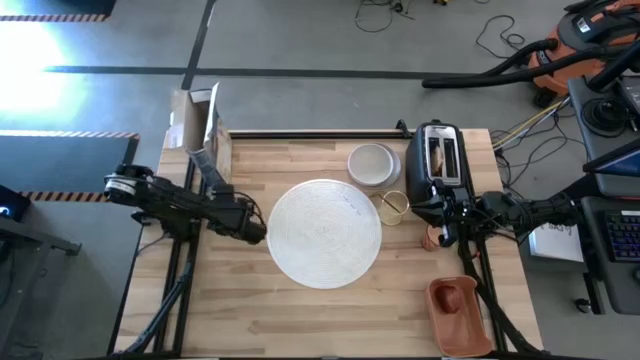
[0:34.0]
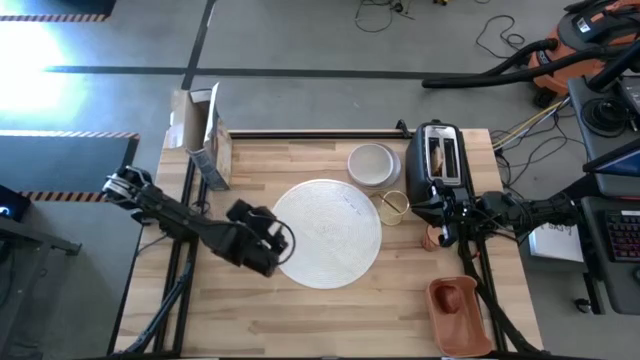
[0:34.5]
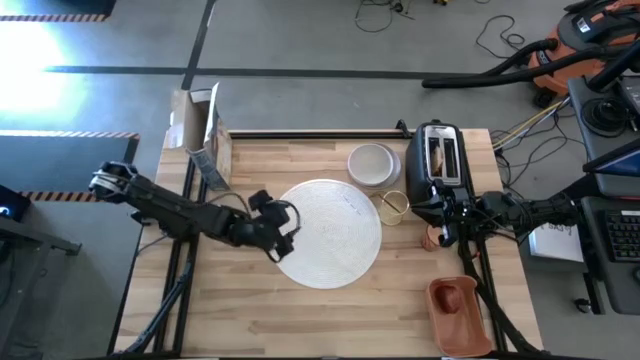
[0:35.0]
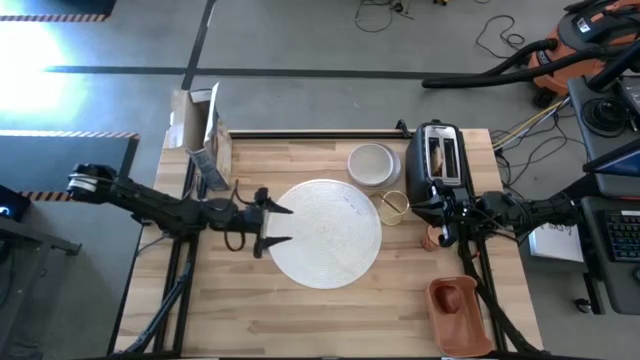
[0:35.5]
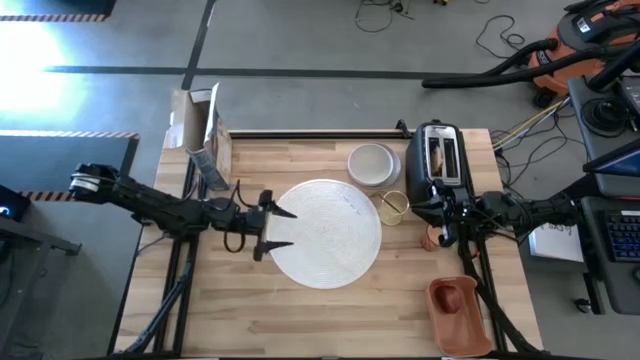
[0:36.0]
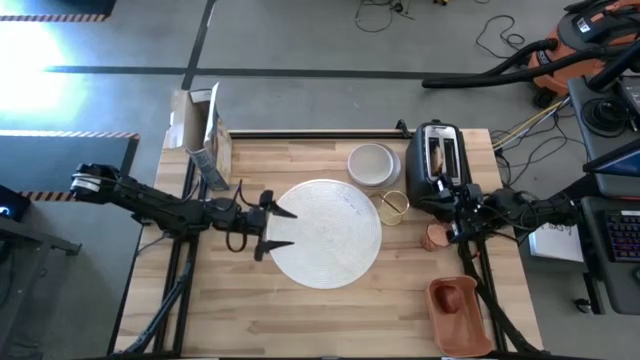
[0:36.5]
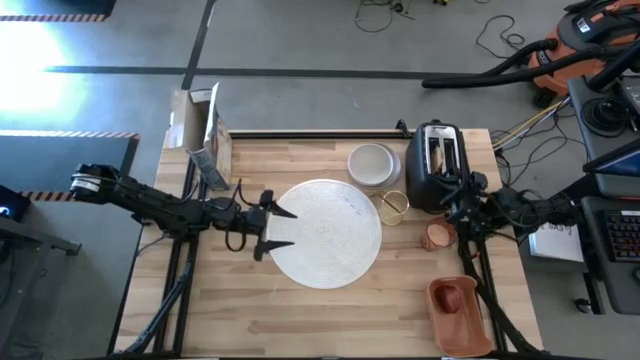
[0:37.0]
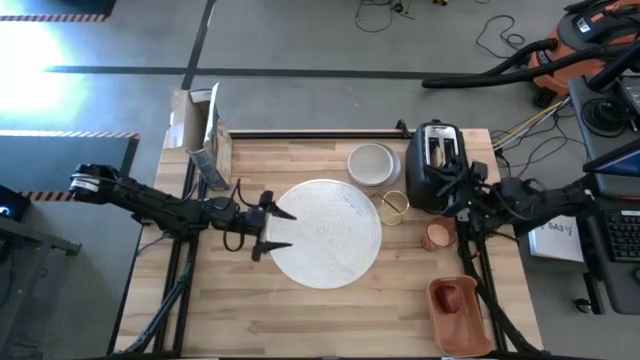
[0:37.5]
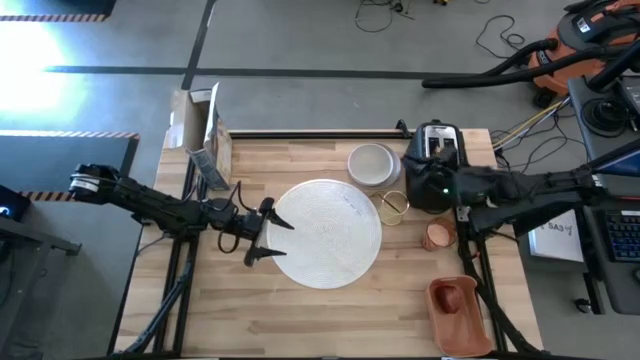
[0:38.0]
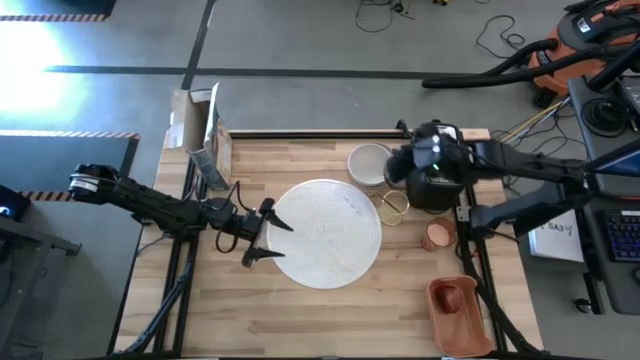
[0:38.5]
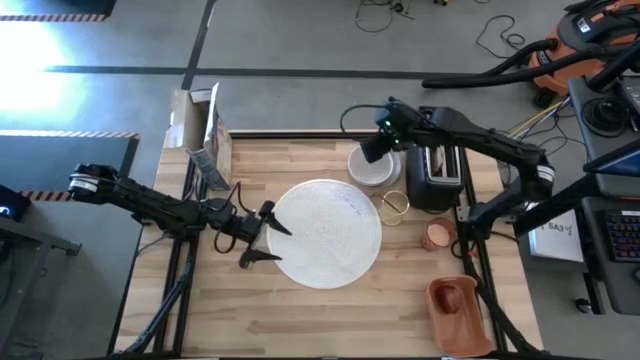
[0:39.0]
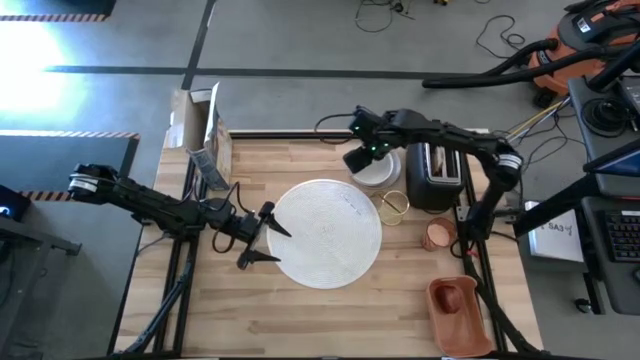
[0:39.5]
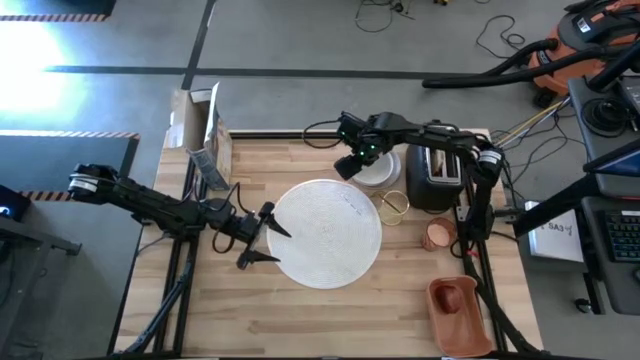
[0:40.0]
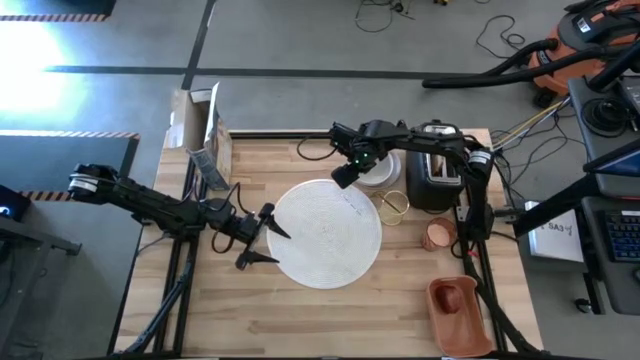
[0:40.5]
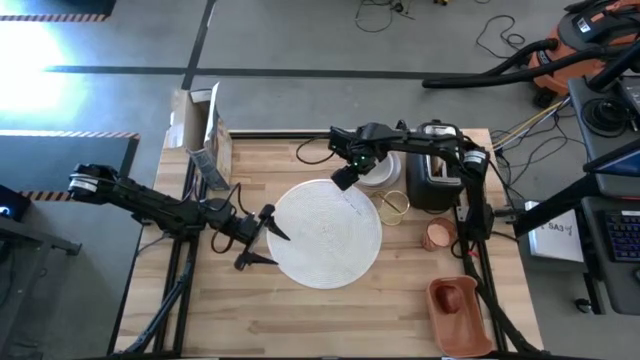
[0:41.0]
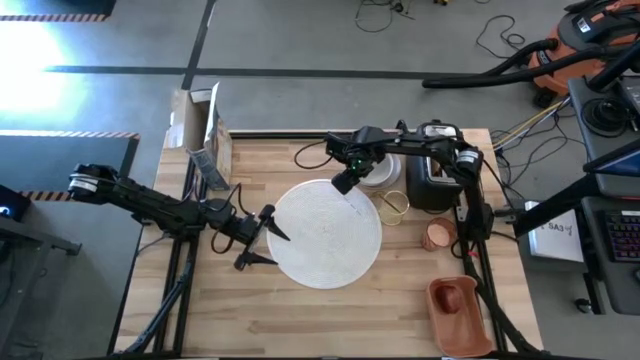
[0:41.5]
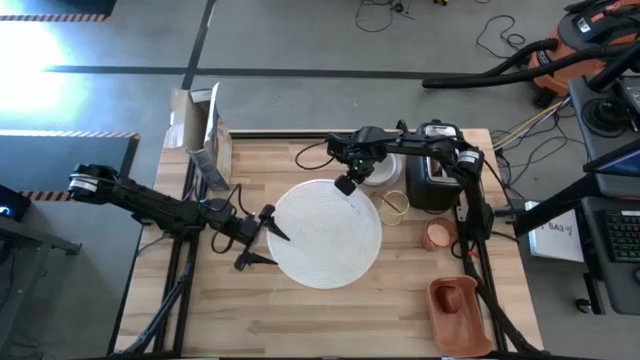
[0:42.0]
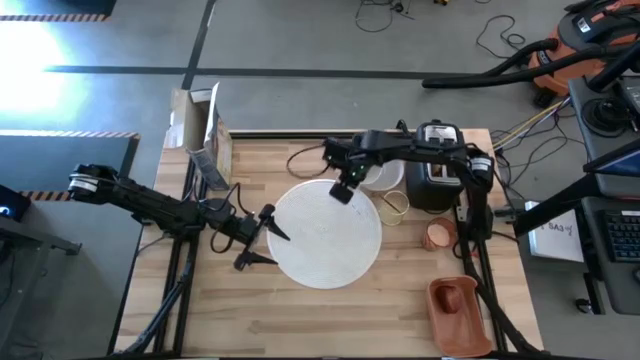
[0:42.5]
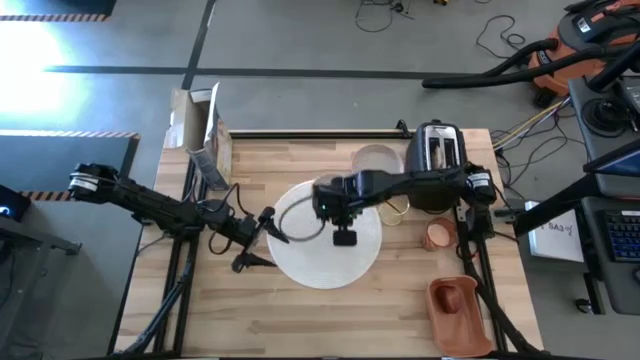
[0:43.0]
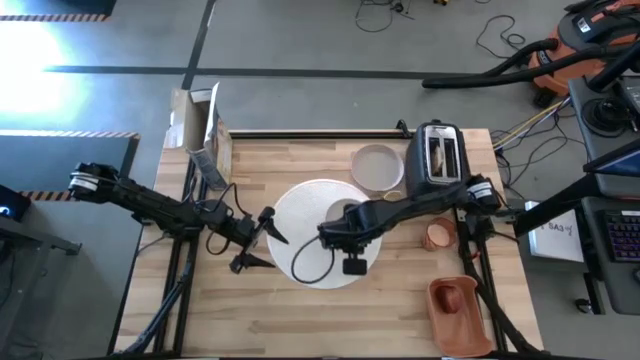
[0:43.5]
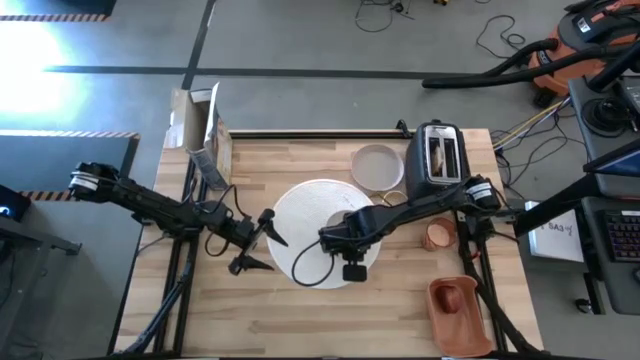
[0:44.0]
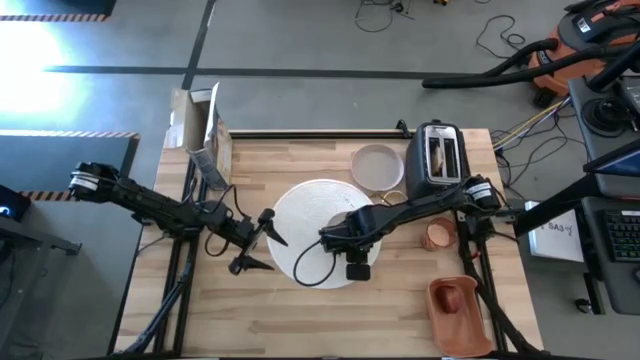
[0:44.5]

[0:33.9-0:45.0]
Task: Arrange a breakfast setting
Put the white bowl on the placemat

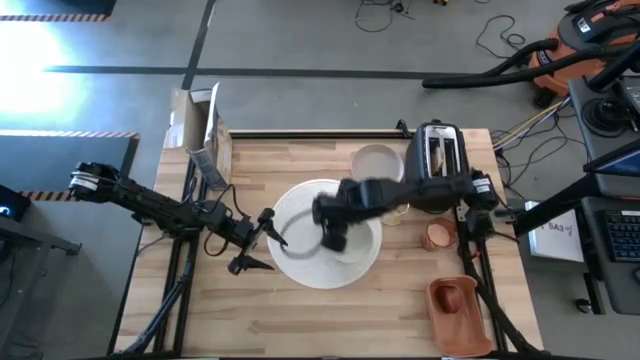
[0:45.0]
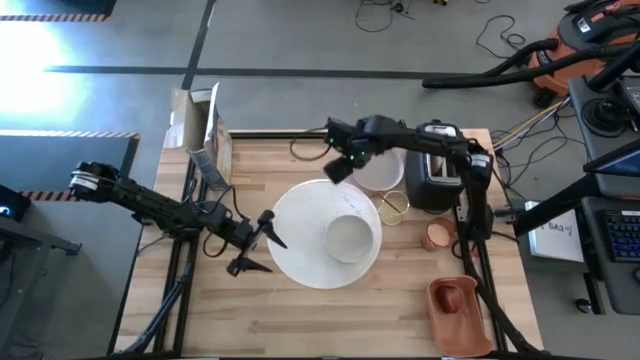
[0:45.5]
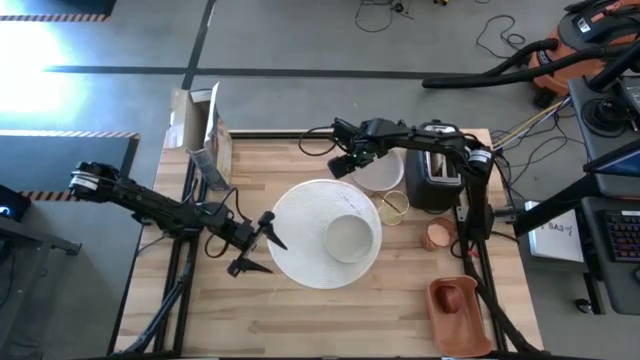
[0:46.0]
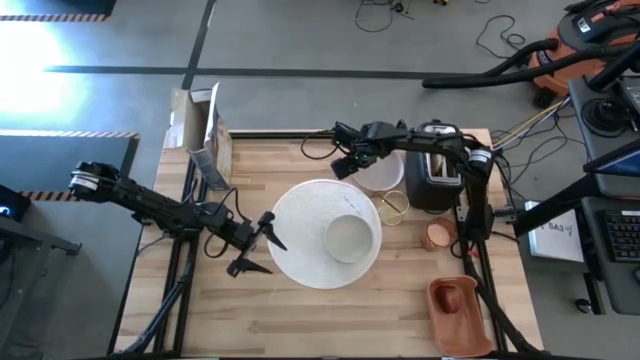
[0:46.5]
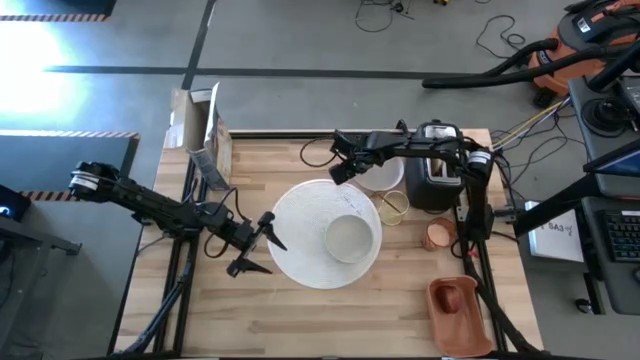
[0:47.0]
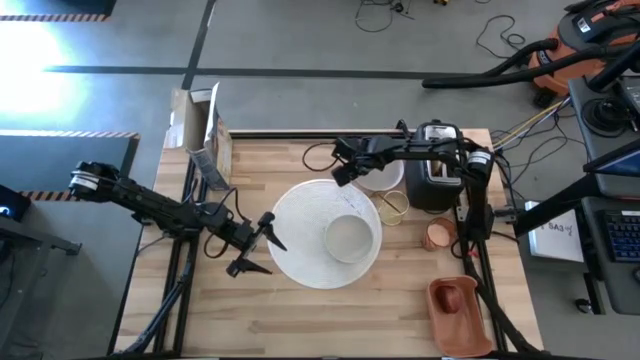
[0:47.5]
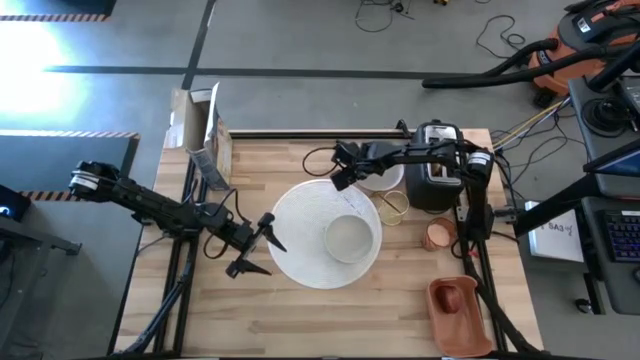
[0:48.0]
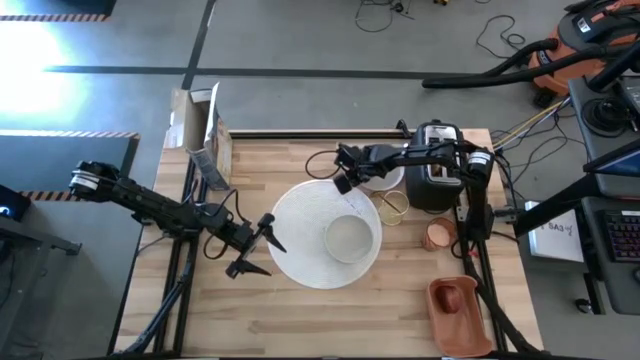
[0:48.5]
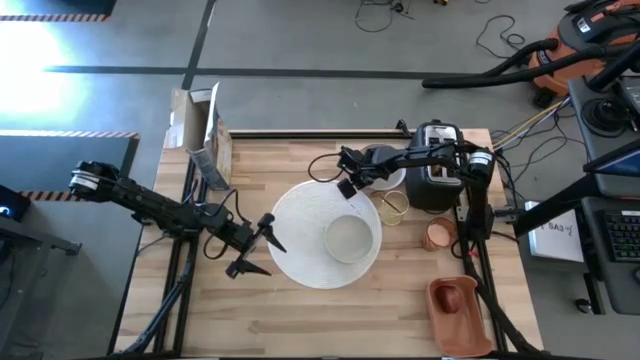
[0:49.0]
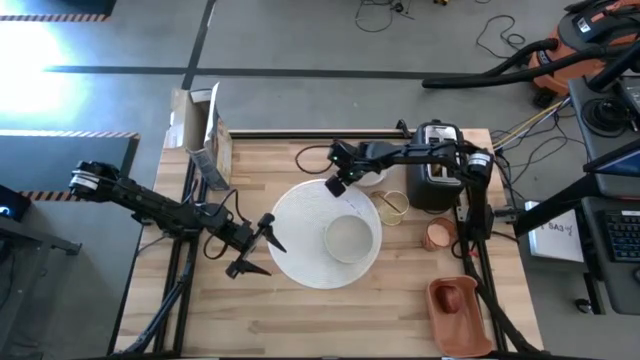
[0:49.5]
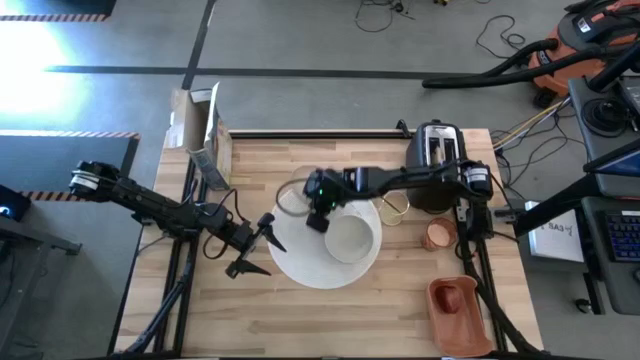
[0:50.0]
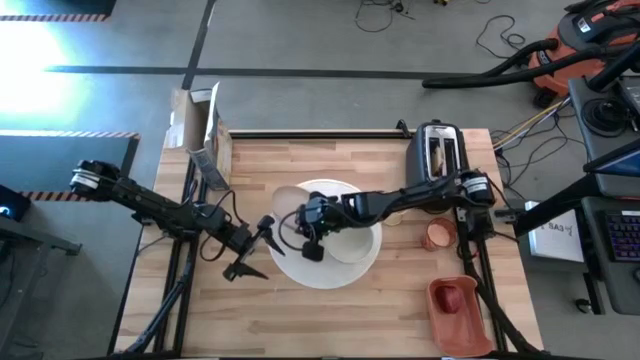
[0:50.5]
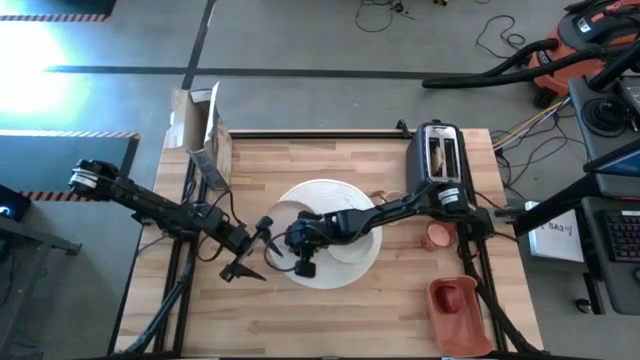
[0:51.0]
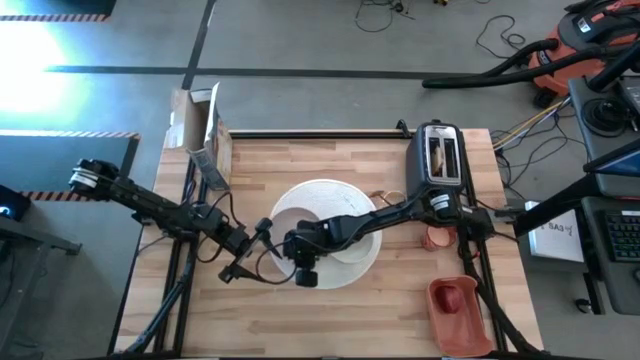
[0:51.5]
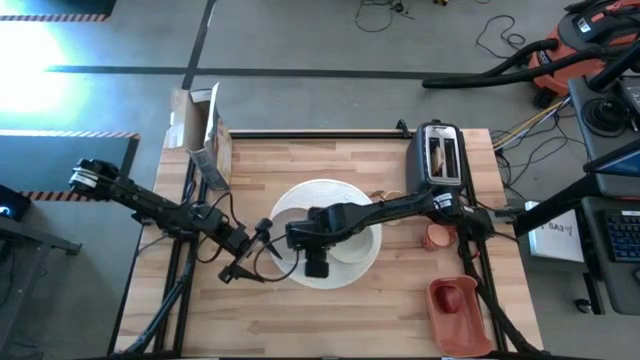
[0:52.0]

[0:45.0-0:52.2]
Put the white plate on the placemat on the left side of the white bowl

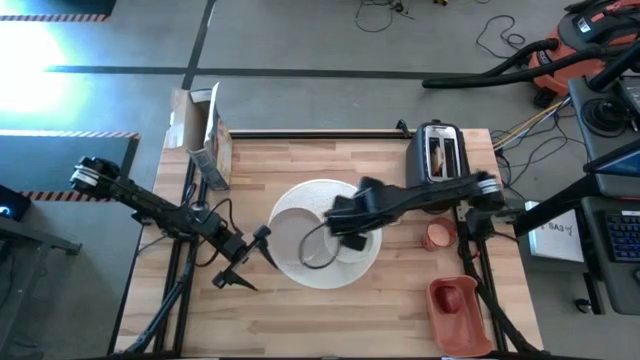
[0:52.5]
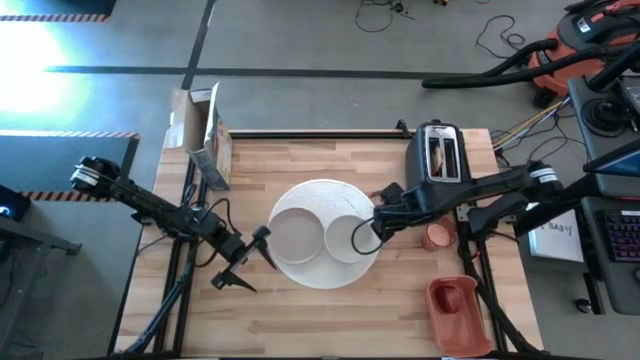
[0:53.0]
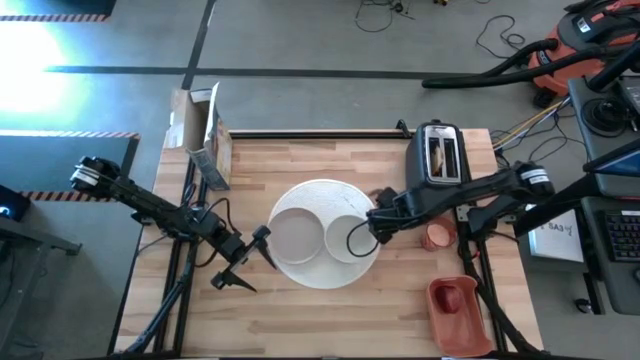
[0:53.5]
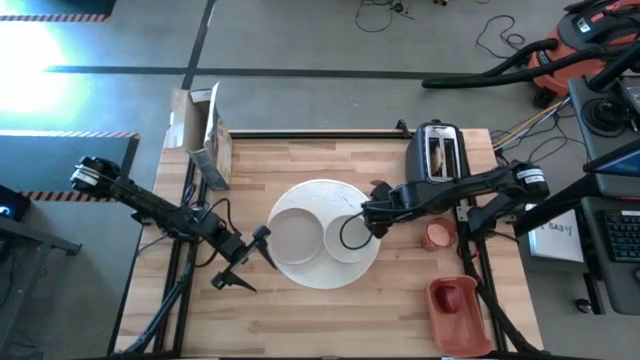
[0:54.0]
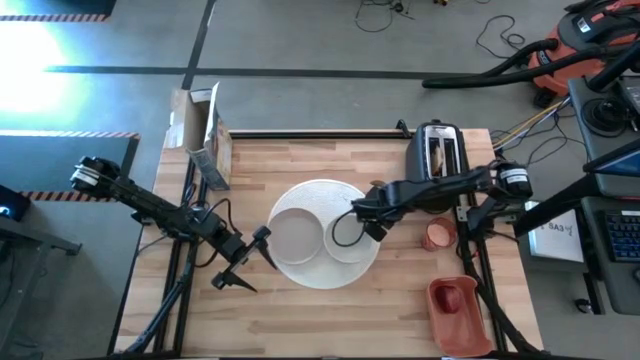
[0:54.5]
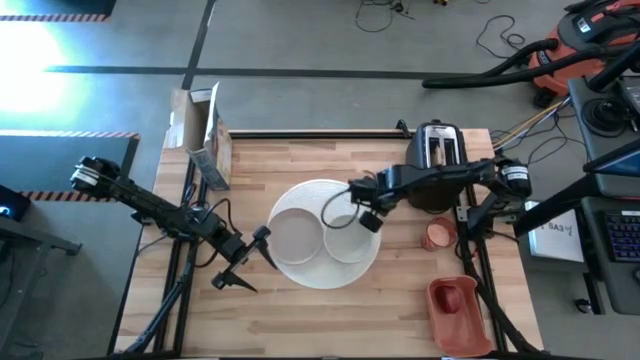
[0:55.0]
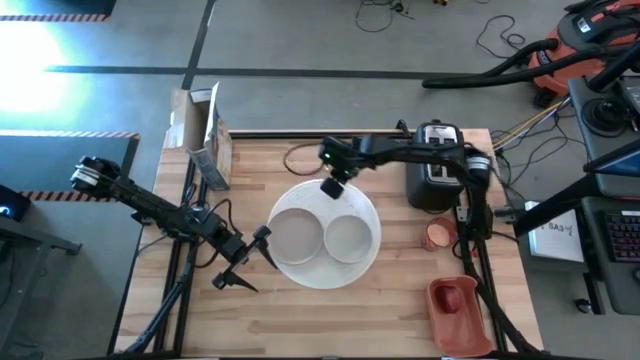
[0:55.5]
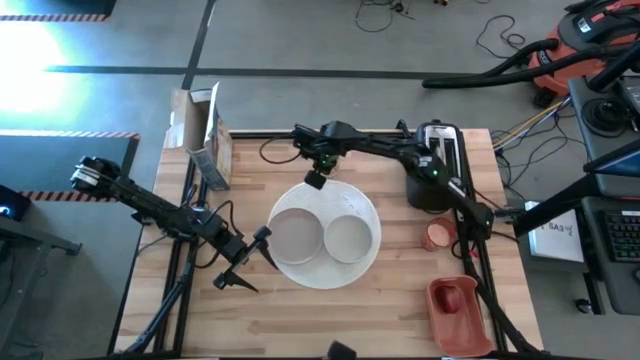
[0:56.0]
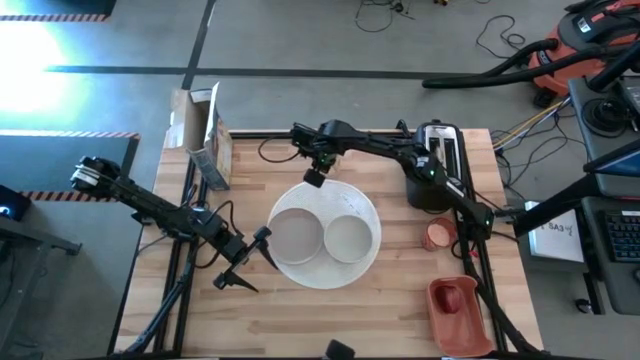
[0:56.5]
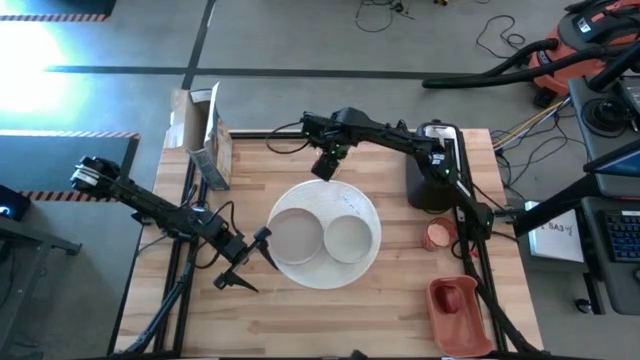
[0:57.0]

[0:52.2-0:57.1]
Move the cutlery to the top center of the table
